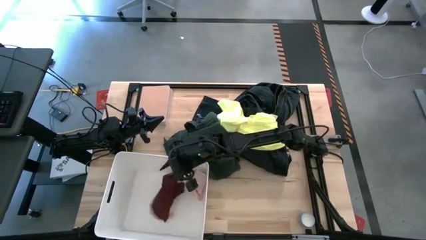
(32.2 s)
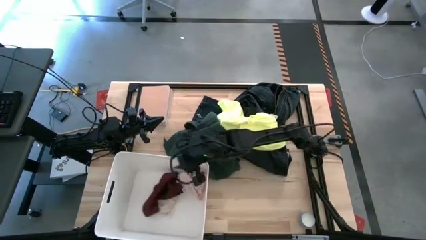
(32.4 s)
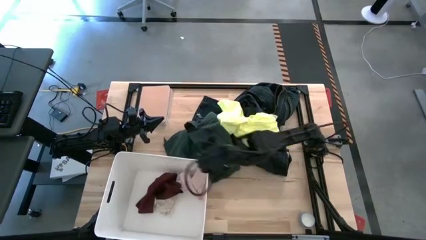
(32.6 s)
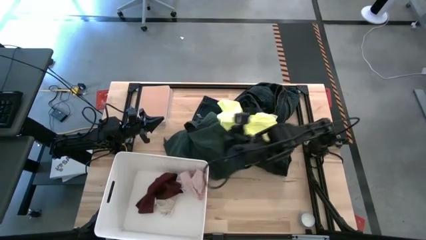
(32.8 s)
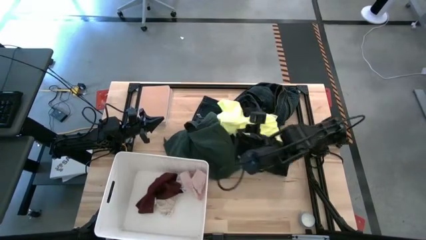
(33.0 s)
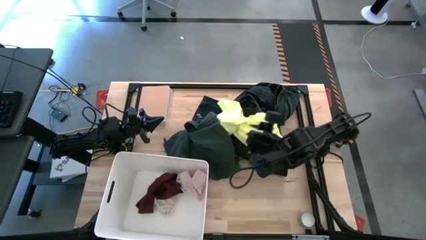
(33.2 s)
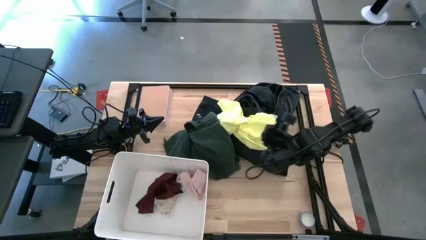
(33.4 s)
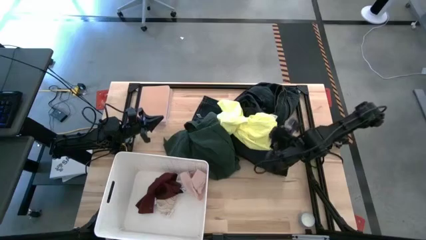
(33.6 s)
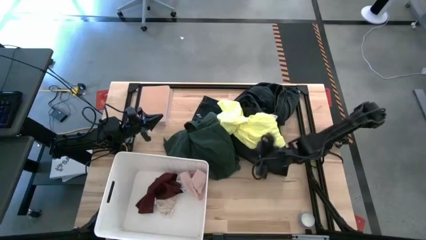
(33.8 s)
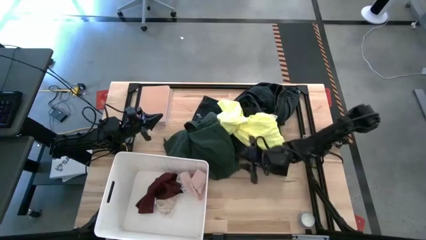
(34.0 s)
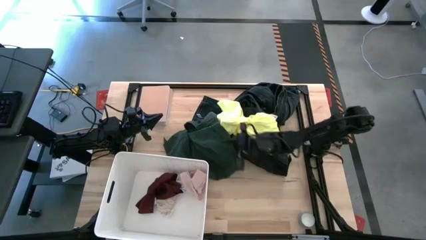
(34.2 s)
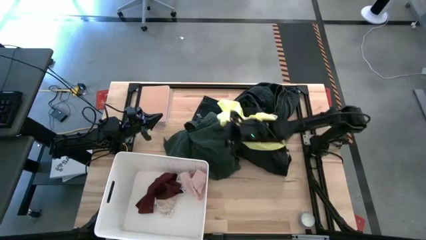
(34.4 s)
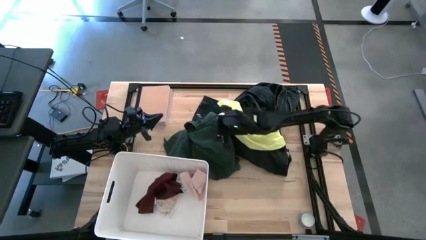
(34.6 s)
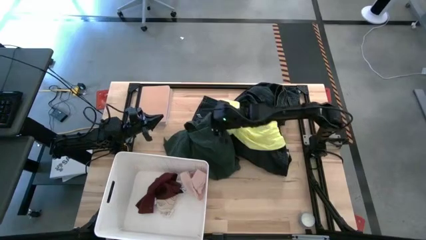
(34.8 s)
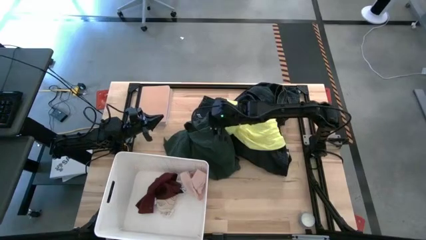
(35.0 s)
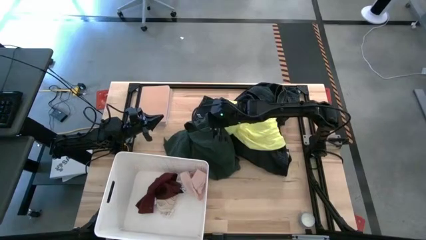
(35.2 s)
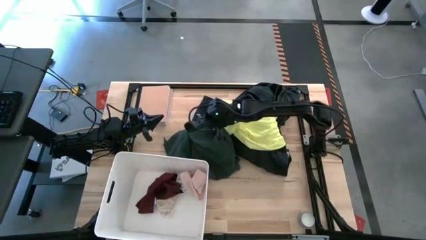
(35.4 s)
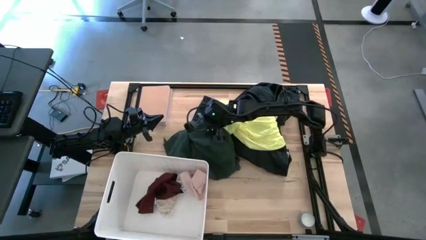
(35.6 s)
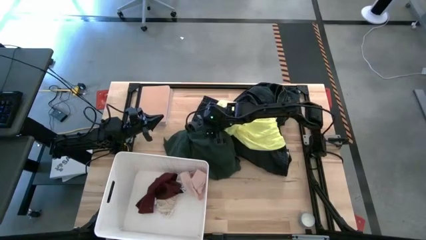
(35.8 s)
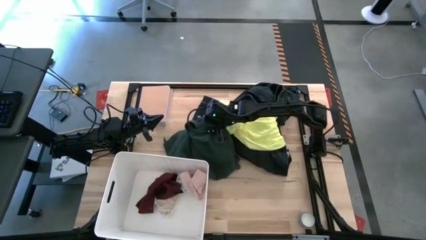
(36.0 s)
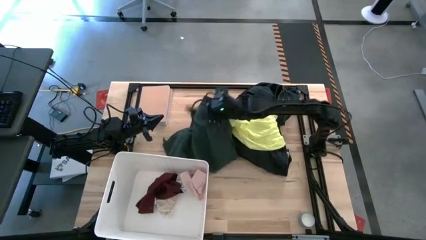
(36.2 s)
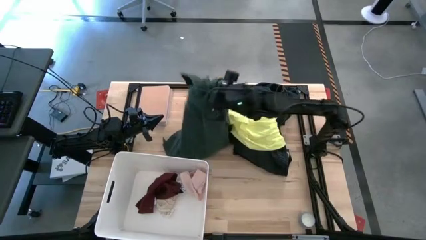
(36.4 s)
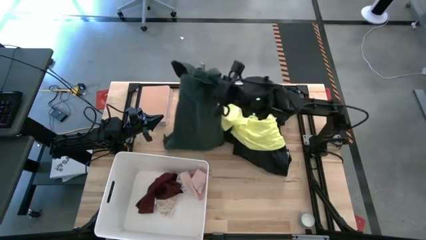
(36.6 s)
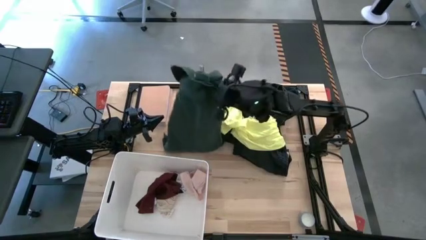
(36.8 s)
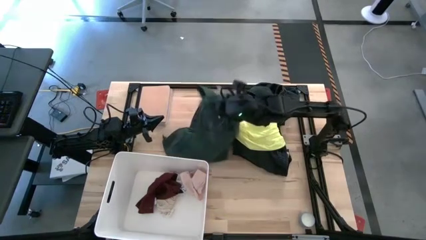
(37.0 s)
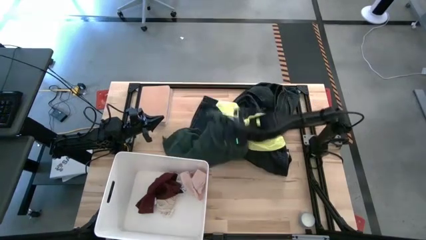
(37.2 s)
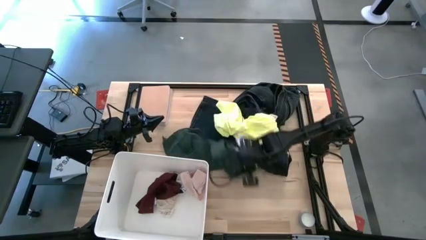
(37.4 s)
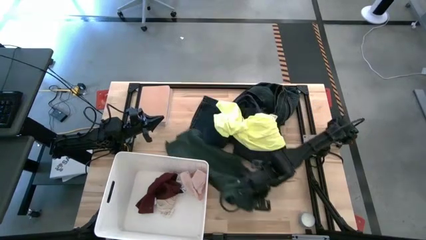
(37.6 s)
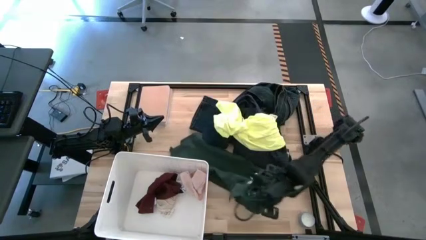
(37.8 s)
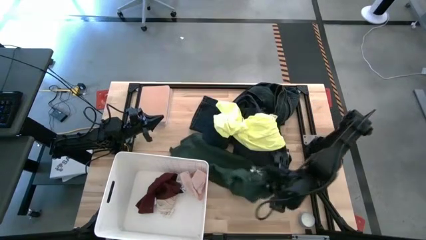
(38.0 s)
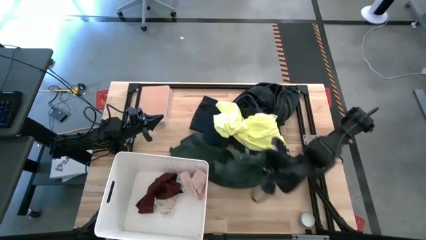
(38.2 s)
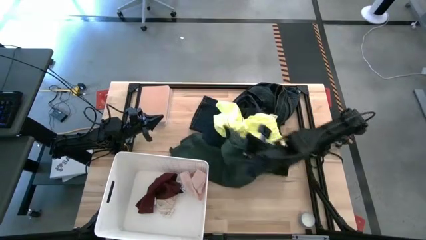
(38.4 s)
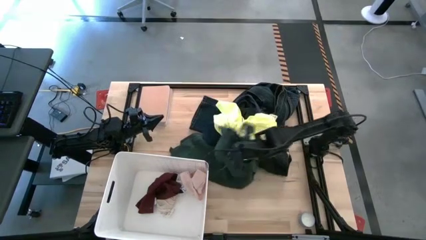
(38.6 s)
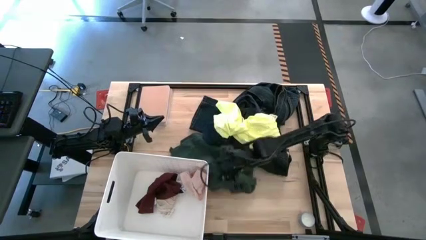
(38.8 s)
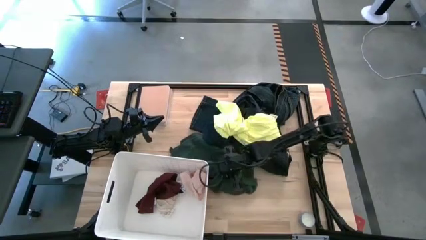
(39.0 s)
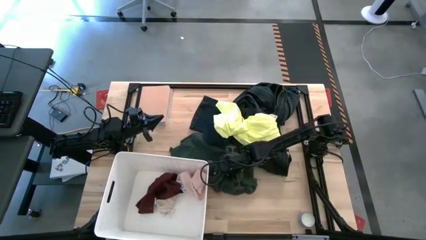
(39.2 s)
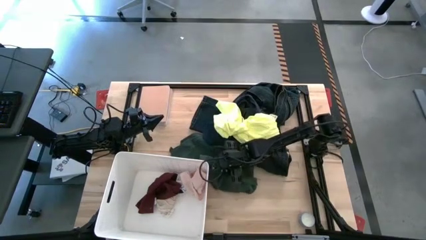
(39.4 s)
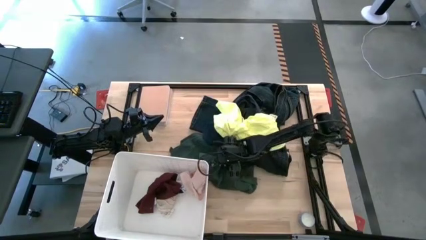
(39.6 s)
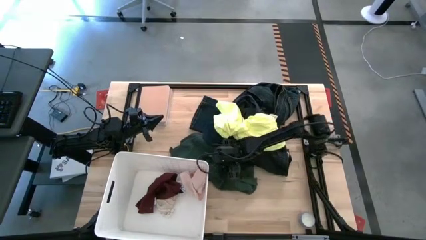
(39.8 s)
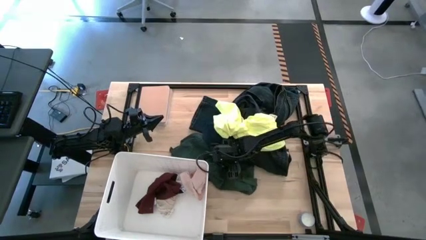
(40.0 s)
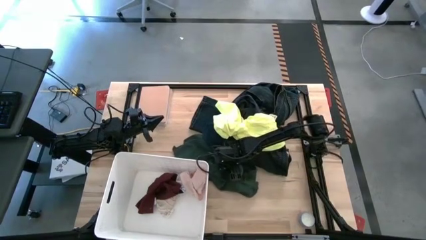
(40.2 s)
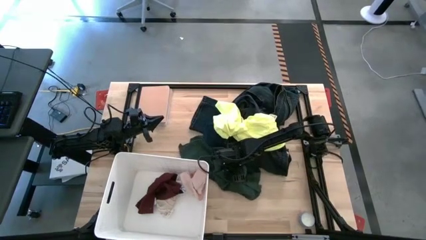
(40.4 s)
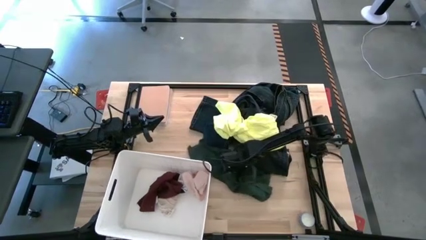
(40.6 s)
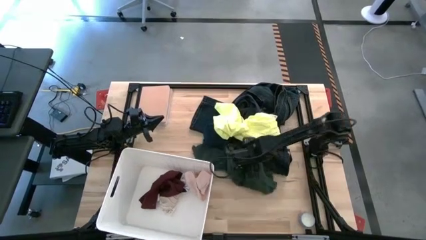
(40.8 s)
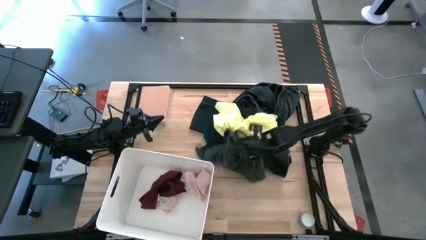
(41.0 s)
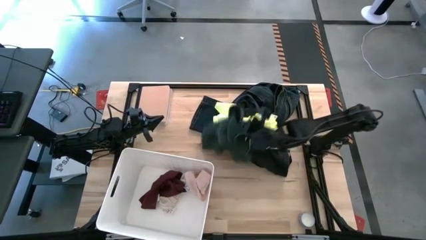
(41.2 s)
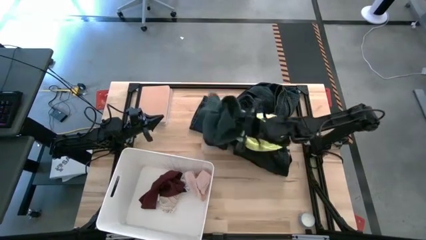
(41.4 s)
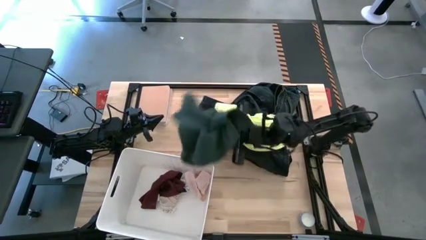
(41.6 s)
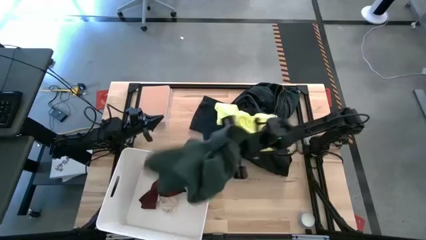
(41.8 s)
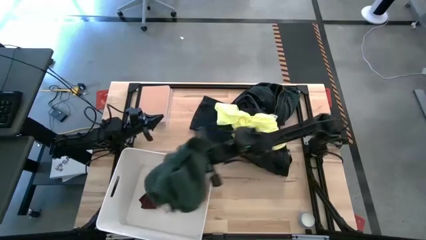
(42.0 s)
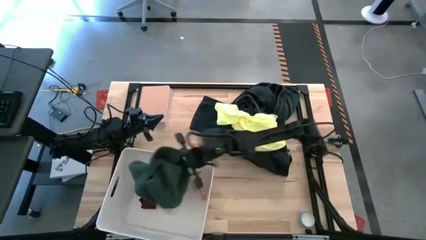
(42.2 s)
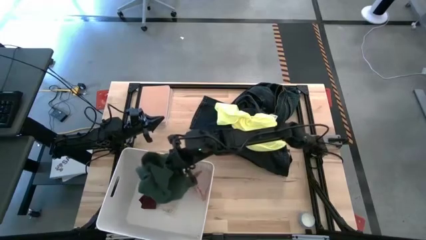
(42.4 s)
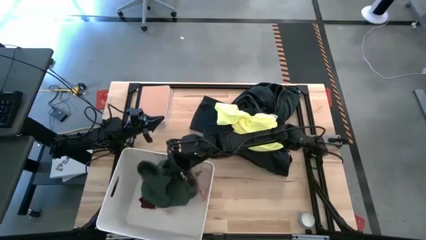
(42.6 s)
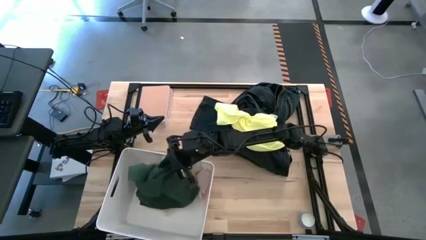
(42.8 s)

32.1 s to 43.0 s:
Task: Sort clothes
Put the green shirt into the white bin

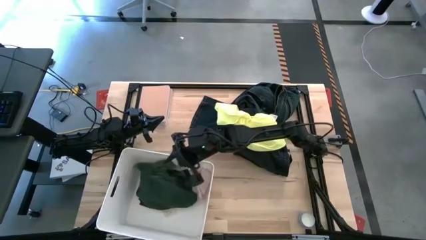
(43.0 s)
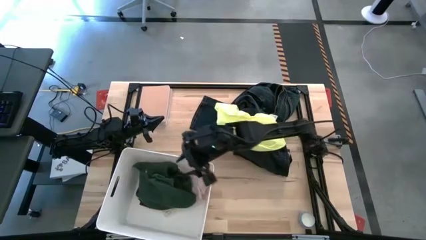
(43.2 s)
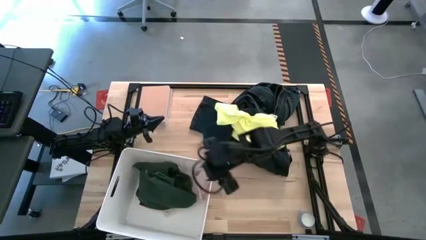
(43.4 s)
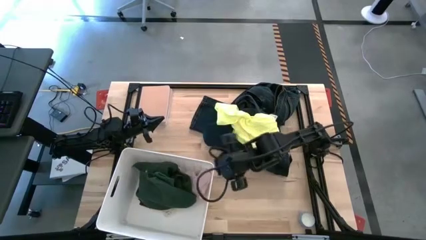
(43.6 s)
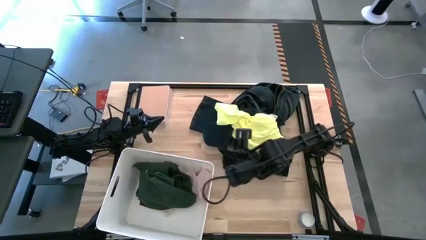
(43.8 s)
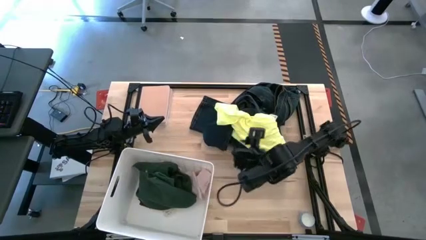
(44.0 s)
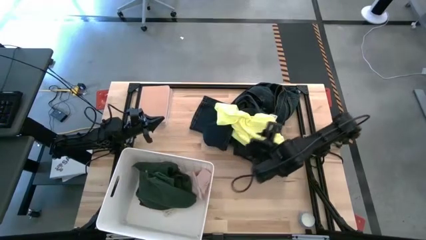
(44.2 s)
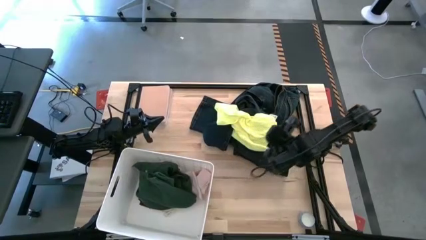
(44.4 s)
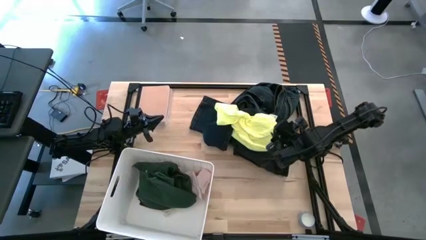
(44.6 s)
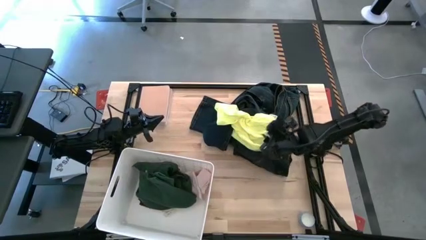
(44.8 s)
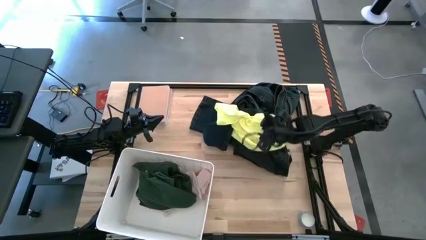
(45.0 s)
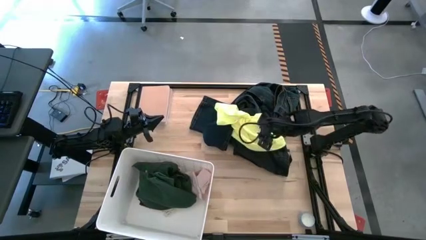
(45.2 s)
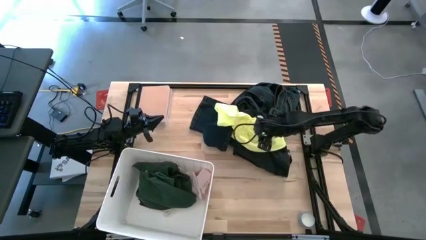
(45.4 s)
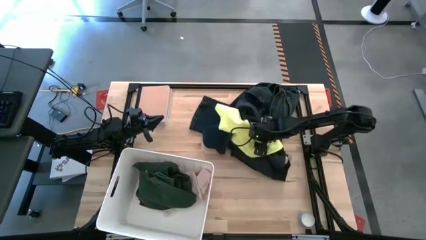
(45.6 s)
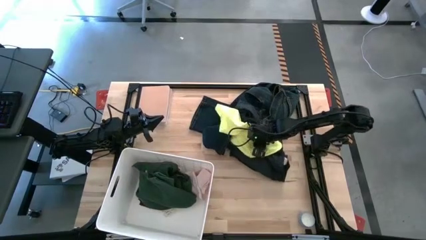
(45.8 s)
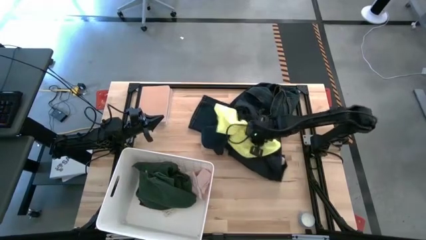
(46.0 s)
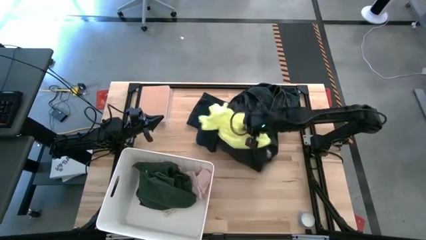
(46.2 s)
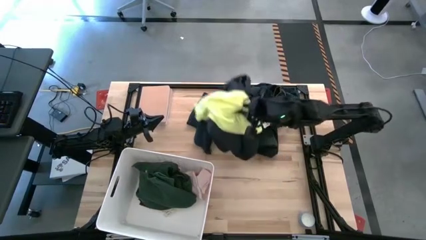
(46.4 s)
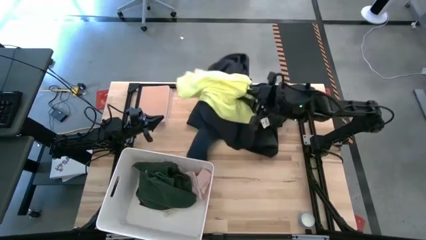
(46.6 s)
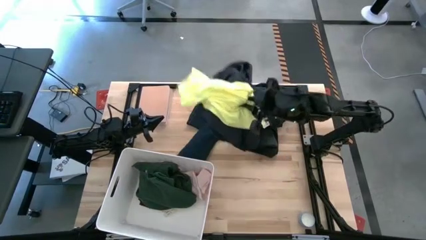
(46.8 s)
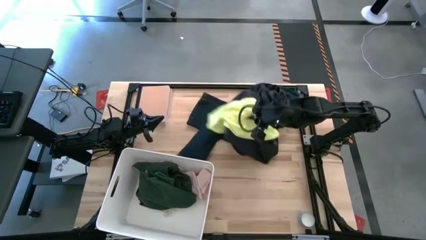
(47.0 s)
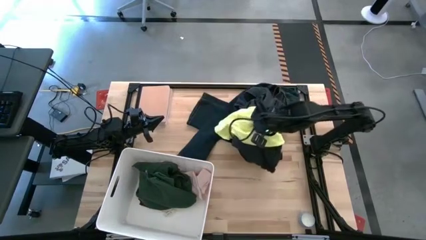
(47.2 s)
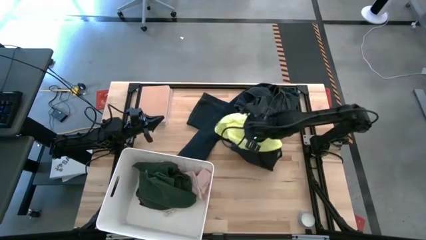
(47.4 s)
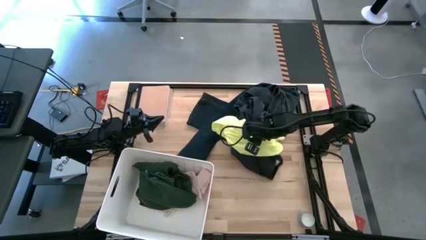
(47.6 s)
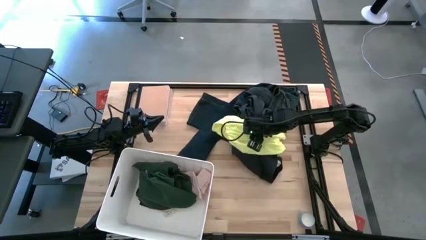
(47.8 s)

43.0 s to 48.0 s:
Put the yellow shirt into the white bin
